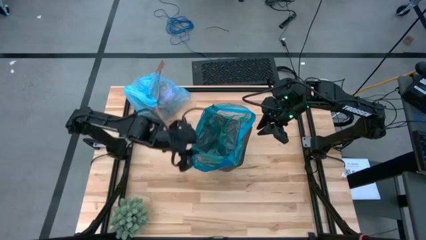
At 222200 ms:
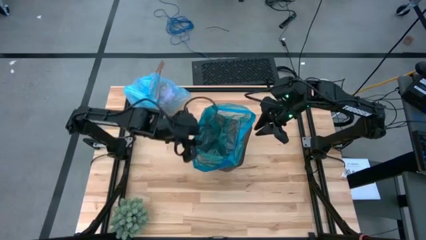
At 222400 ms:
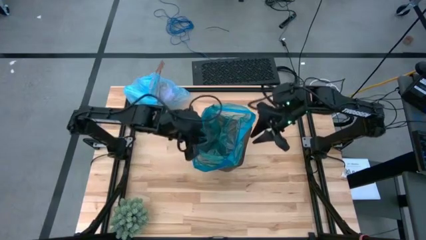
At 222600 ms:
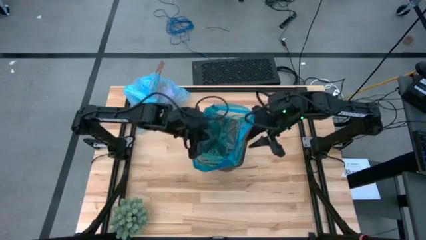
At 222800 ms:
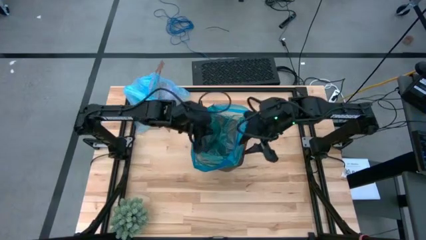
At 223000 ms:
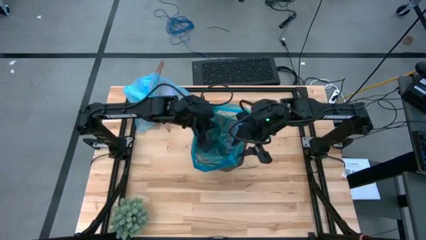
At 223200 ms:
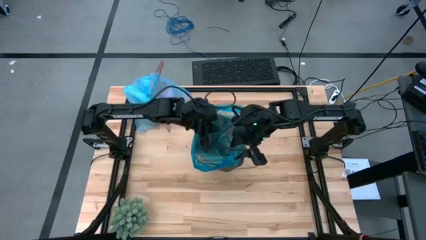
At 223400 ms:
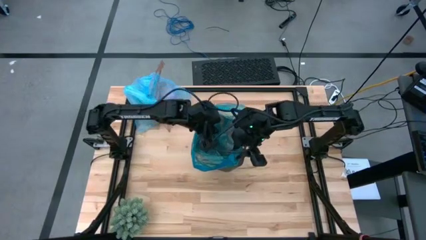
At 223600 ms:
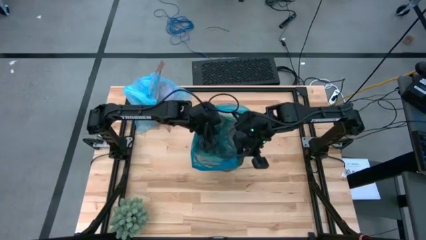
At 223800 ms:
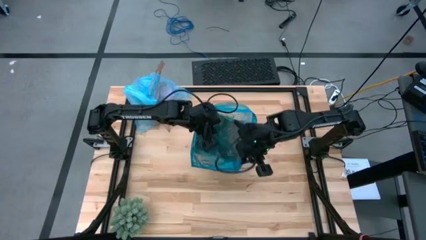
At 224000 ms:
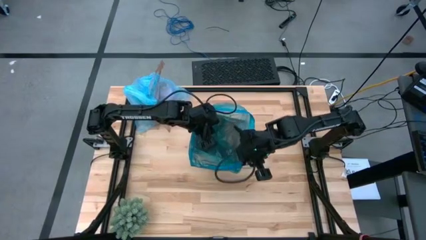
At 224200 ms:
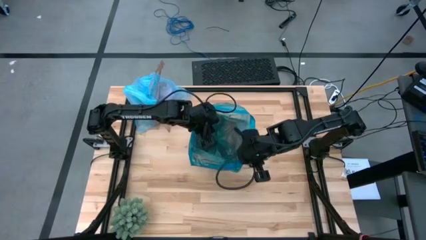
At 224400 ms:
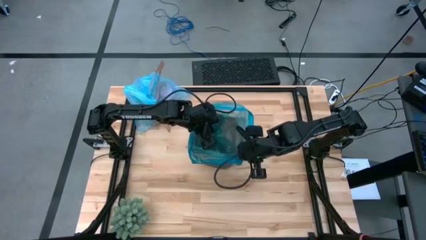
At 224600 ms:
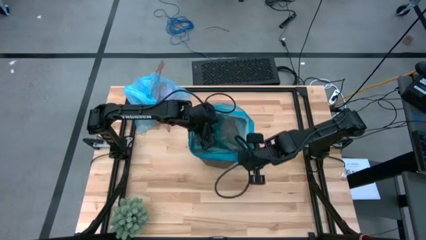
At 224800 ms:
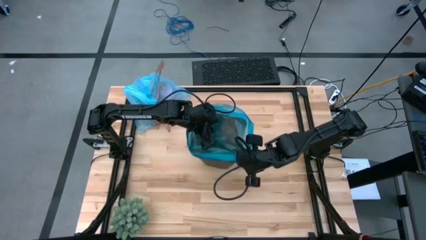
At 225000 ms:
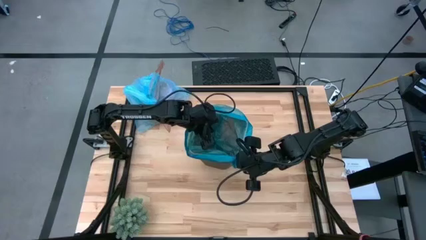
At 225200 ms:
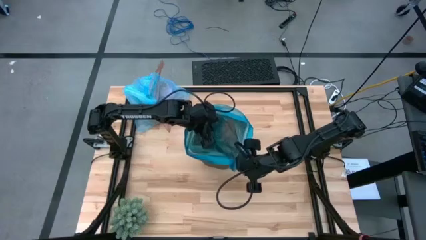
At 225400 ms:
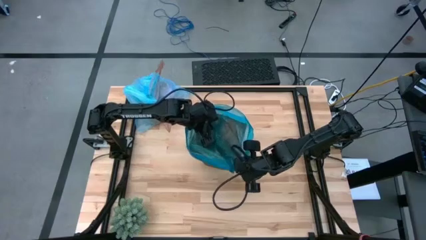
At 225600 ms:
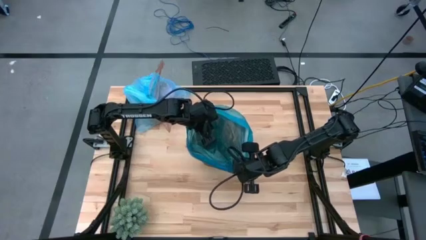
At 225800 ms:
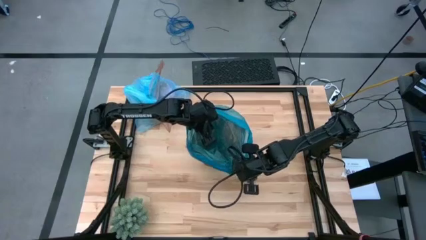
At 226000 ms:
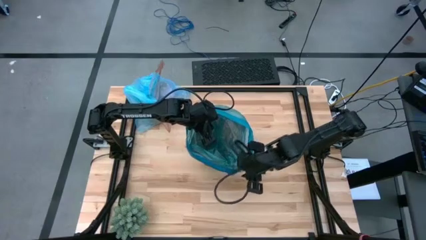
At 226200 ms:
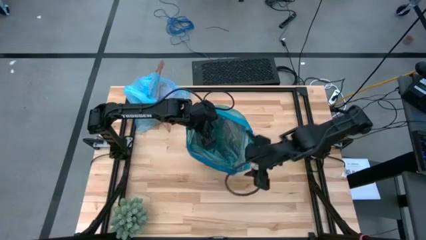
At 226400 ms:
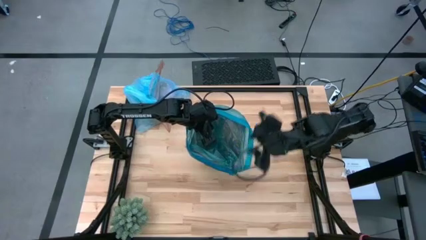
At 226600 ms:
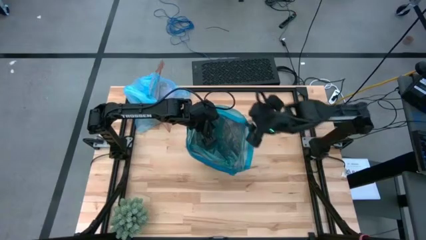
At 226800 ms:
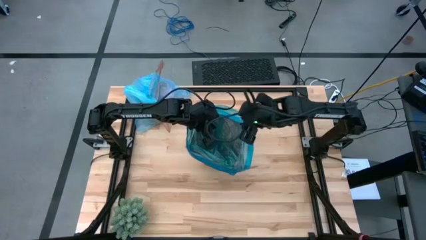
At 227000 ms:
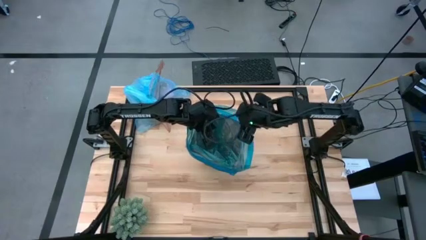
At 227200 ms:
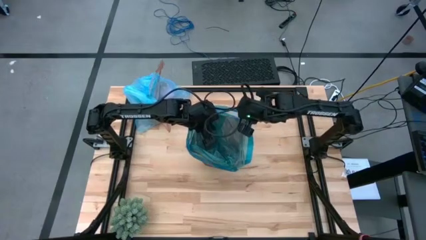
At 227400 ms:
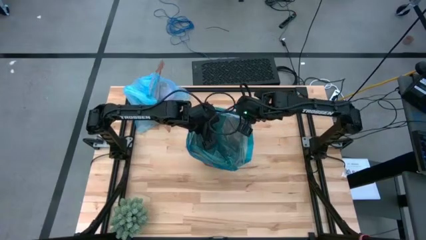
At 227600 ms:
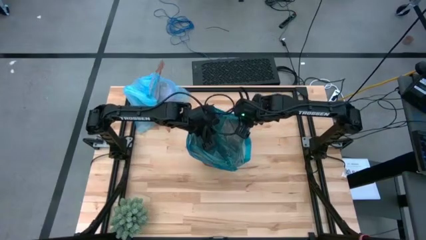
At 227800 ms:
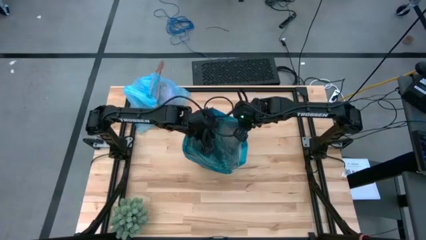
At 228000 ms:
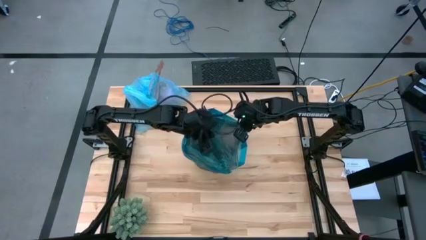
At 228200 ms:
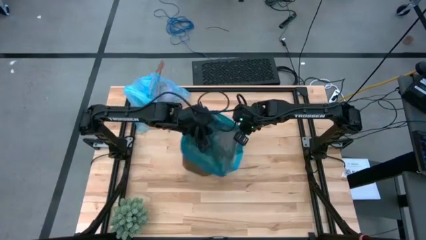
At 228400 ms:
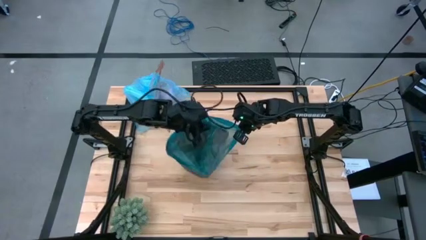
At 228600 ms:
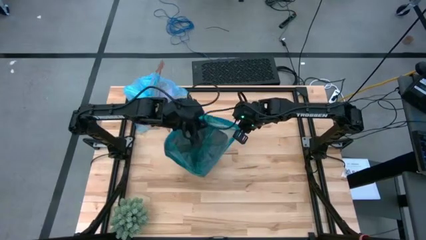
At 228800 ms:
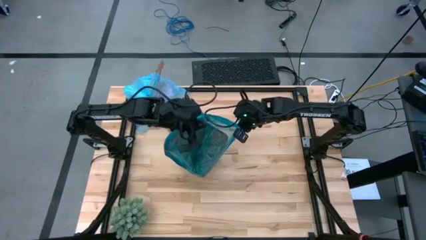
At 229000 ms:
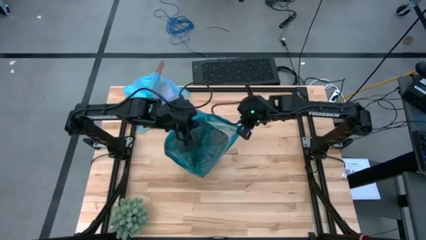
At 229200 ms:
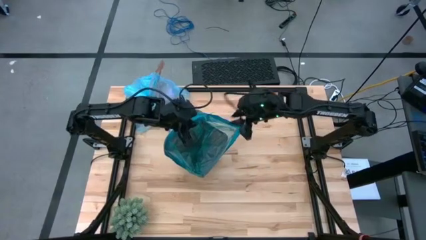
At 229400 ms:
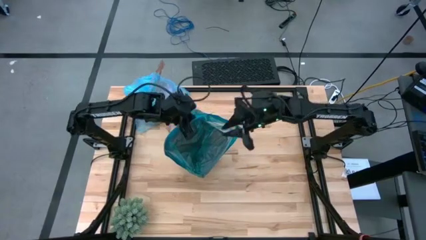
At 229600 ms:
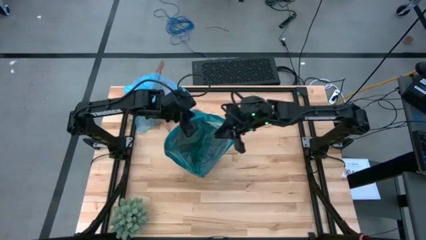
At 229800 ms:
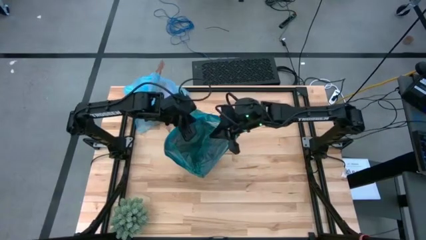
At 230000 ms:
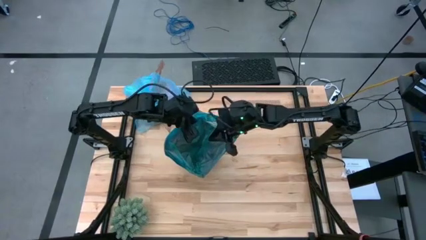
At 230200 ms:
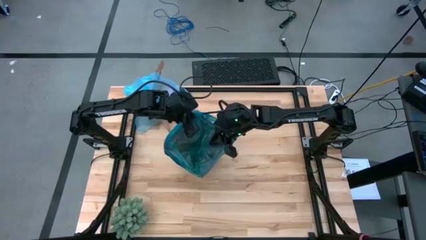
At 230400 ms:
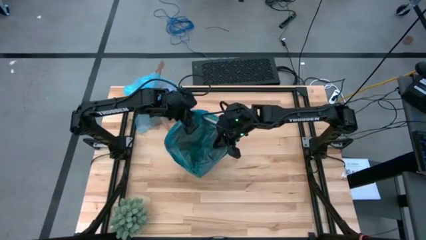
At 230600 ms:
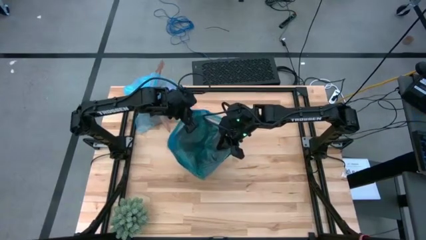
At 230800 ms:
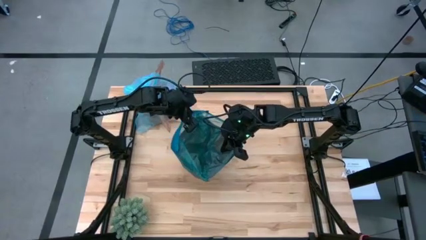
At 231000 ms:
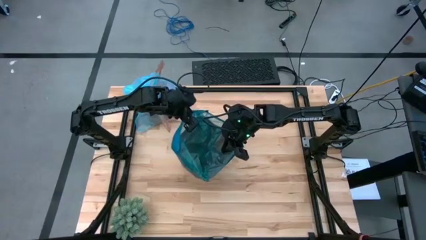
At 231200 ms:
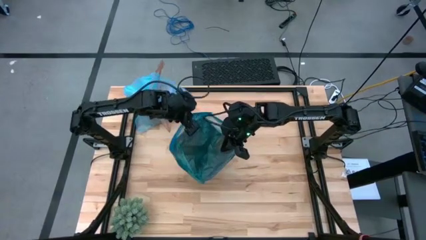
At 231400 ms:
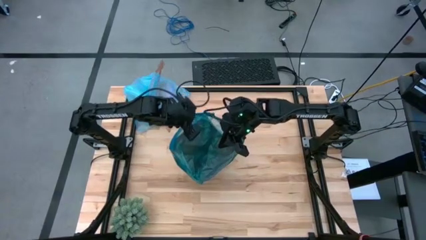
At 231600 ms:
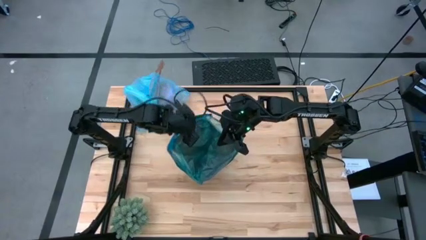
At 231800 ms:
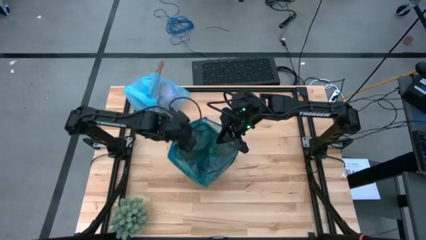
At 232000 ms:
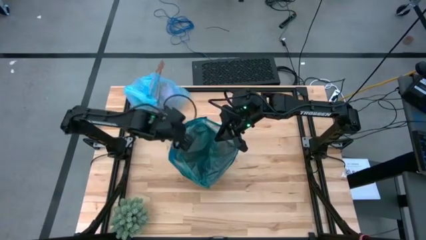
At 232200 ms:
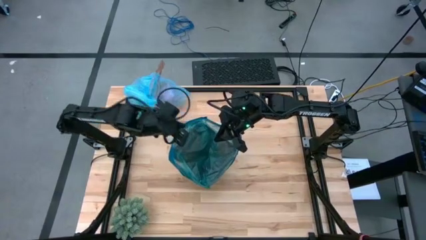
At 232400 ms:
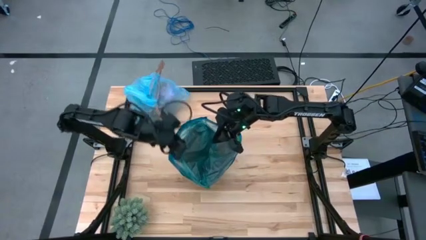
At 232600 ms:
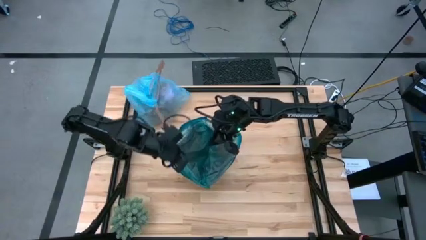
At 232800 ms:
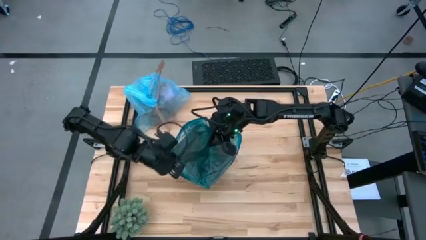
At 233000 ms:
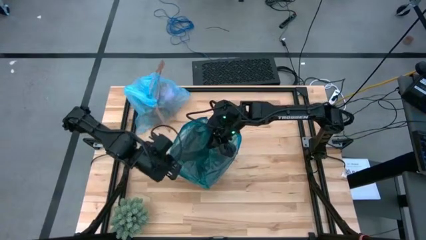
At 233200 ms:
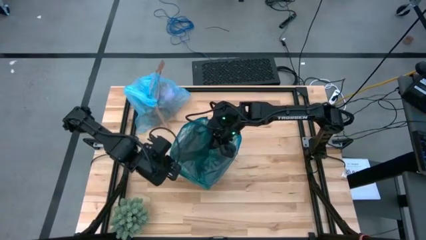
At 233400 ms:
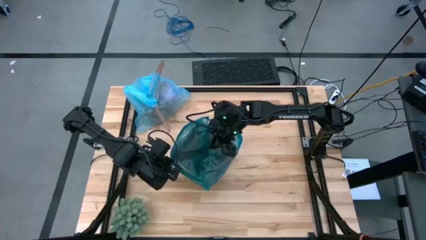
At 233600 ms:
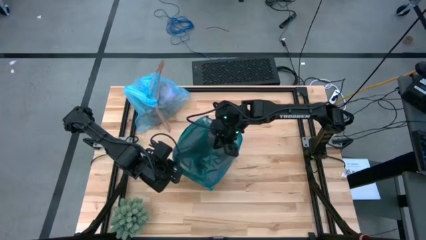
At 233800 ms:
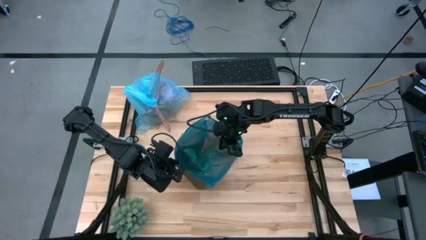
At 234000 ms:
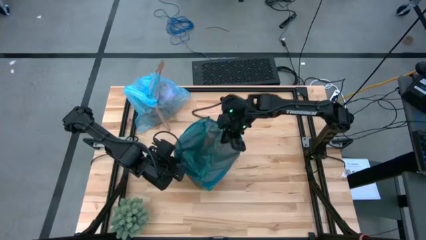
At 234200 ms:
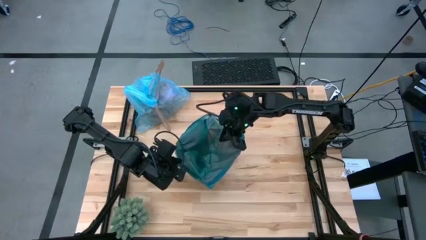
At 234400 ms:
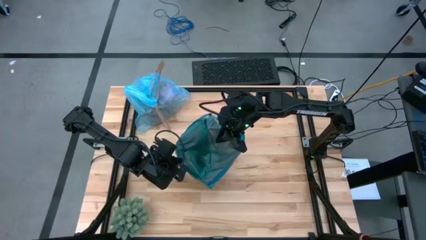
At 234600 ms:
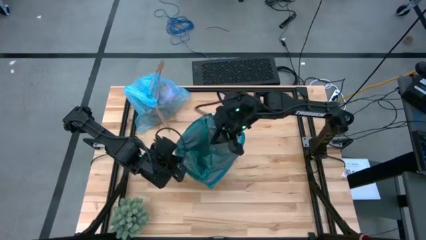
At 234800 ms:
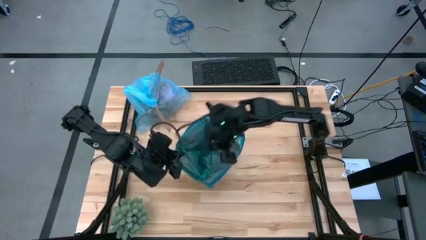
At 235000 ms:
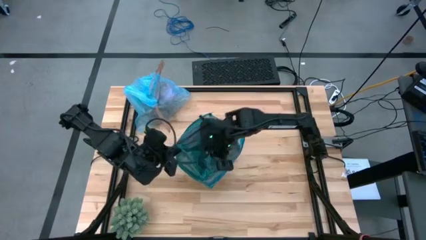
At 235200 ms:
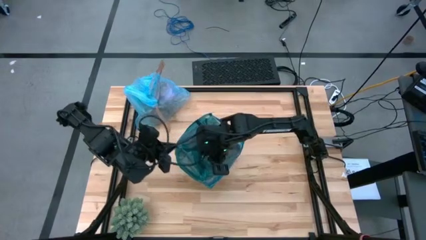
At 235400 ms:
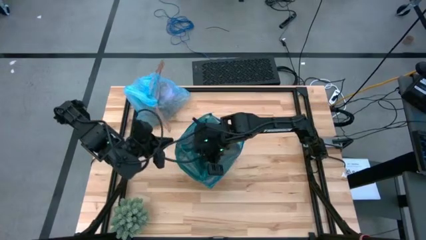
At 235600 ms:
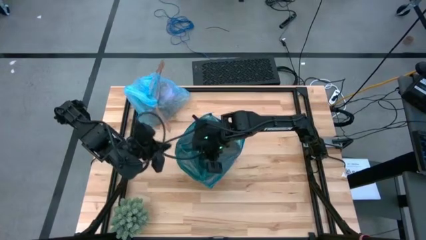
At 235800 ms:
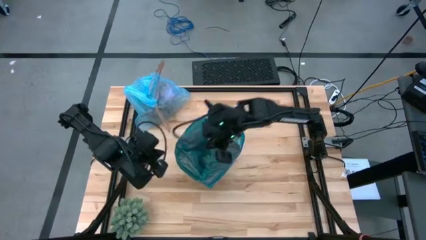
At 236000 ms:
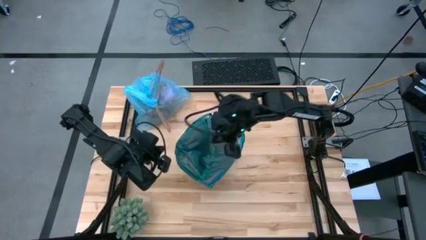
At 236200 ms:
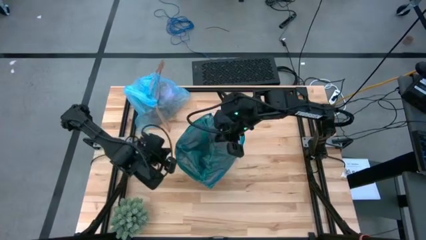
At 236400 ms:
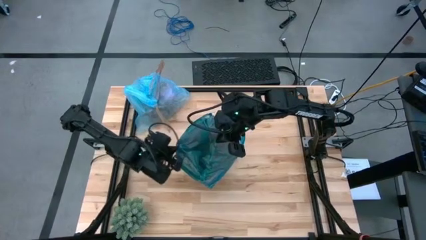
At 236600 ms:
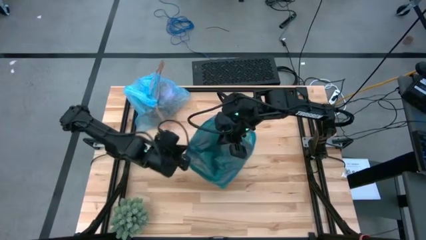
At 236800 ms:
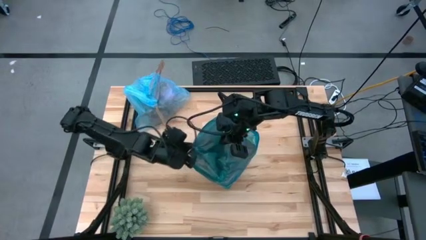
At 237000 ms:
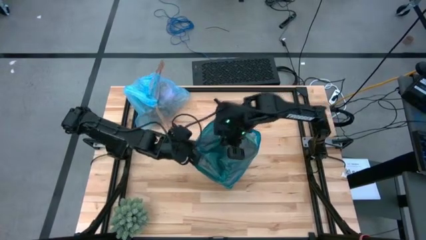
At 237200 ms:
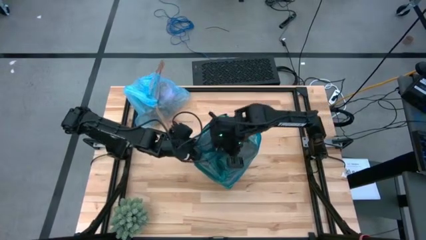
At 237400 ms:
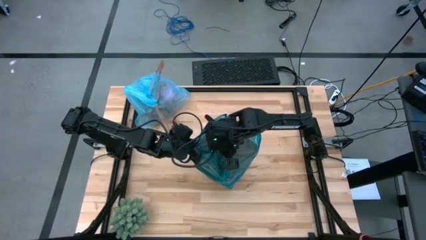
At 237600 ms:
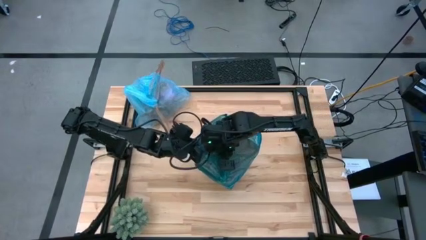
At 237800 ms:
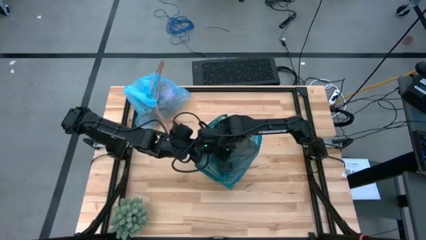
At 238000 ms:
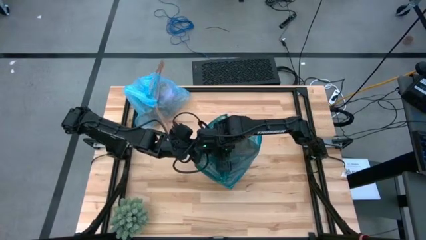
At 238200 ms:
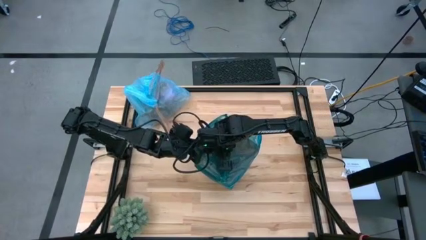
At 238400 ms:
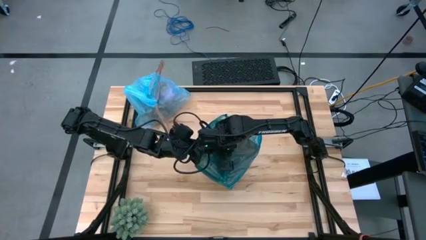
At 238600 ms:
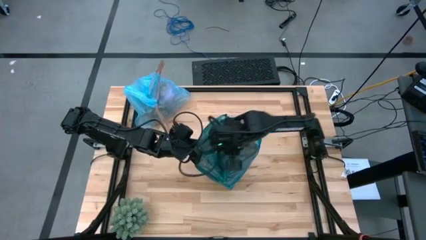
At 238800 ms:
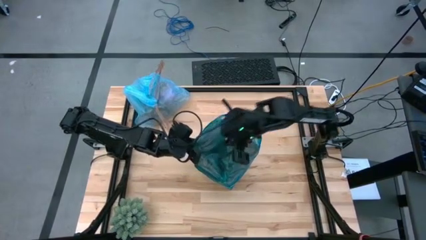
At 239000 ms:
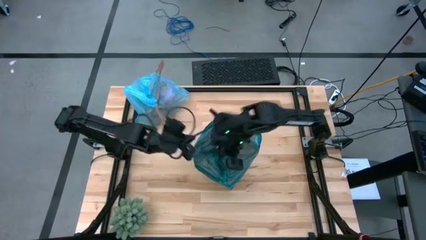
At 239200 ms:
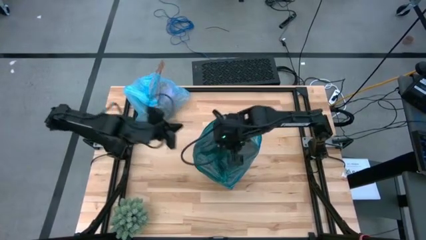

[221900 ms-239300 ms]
Task: place trash/remove bag and relplace
Insert the blue trash bag into the black trash bin
